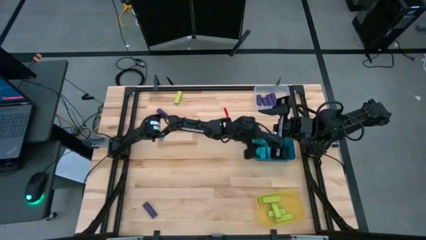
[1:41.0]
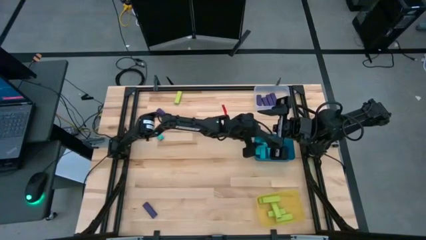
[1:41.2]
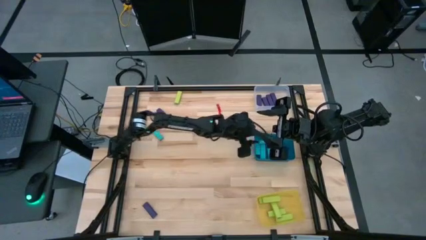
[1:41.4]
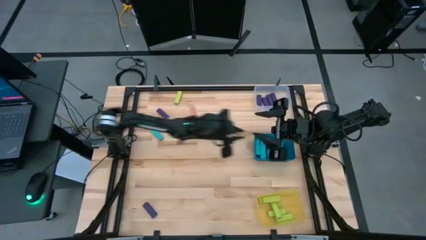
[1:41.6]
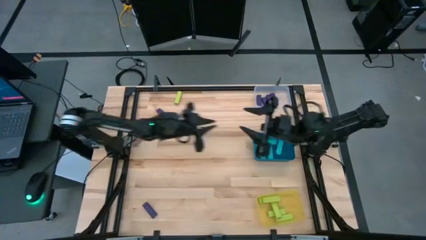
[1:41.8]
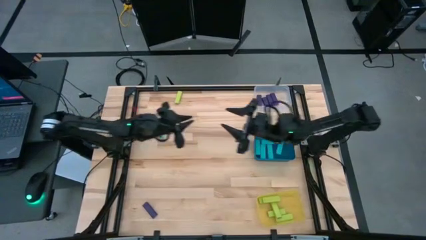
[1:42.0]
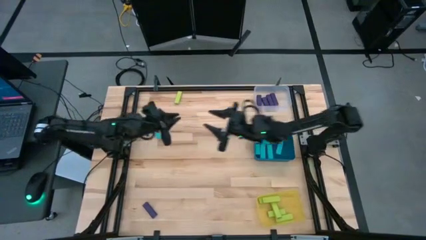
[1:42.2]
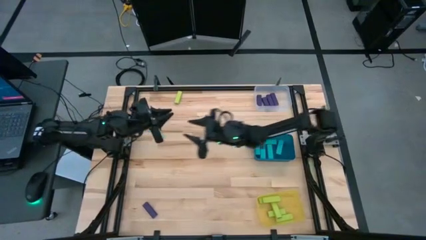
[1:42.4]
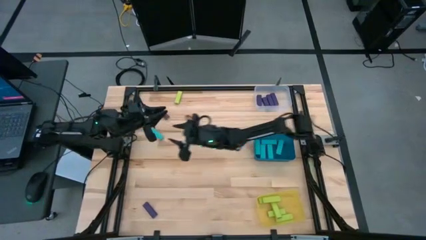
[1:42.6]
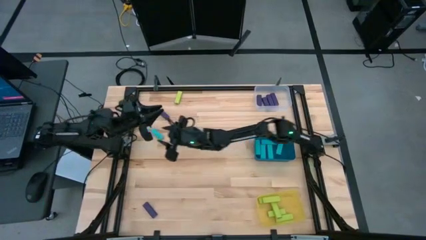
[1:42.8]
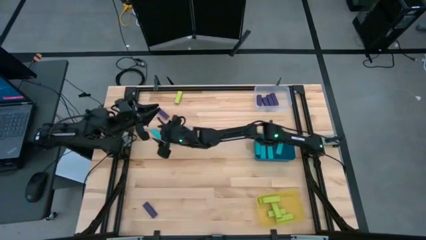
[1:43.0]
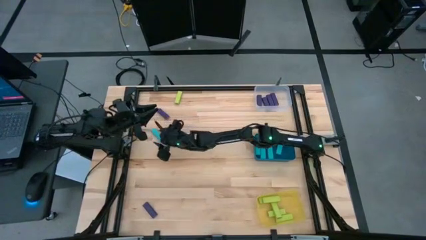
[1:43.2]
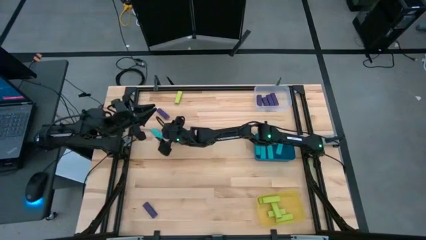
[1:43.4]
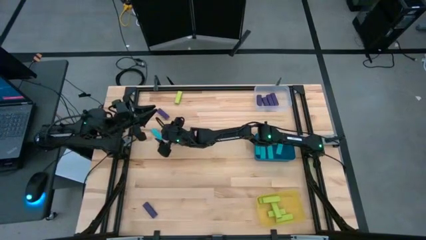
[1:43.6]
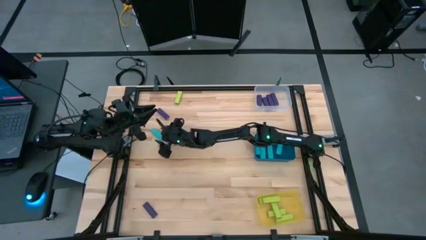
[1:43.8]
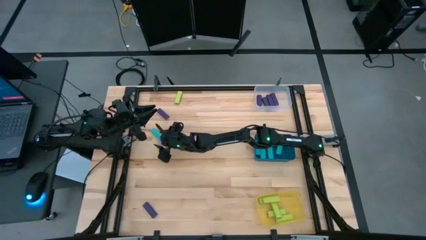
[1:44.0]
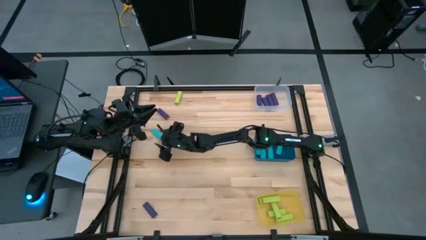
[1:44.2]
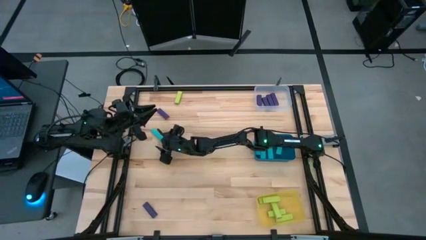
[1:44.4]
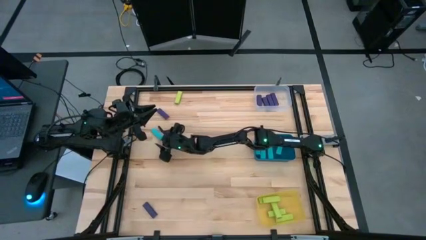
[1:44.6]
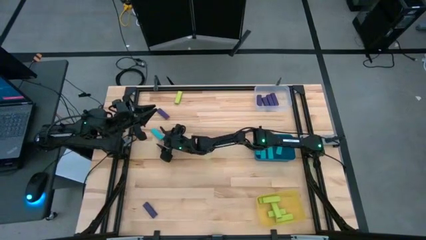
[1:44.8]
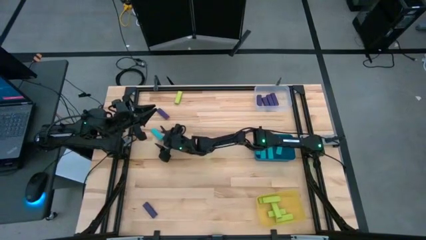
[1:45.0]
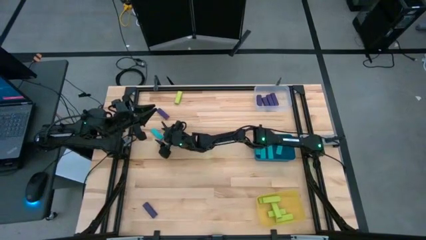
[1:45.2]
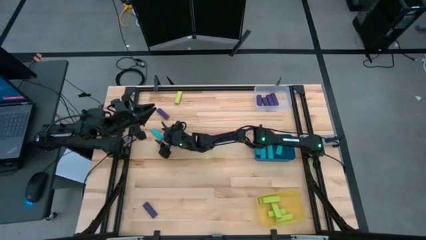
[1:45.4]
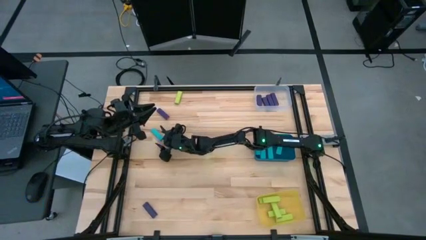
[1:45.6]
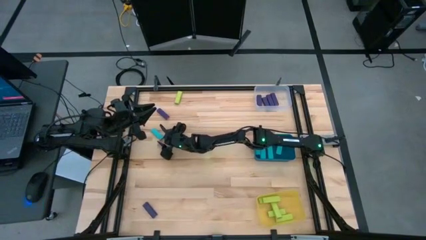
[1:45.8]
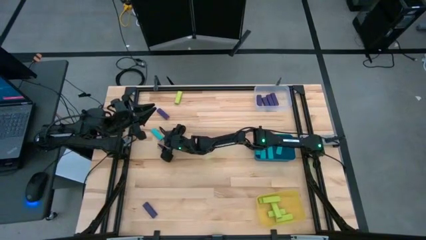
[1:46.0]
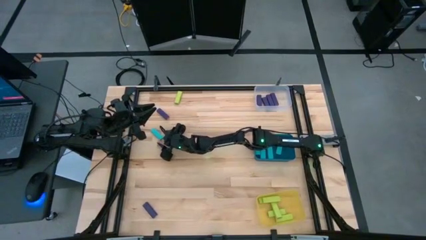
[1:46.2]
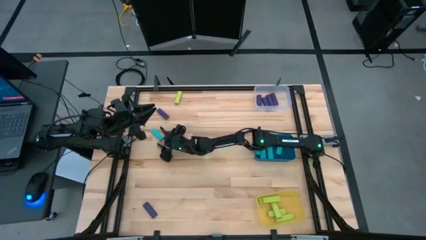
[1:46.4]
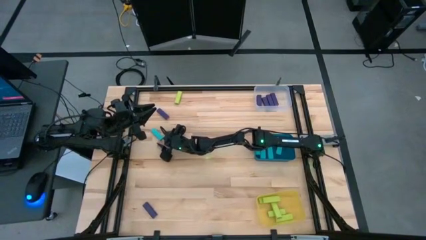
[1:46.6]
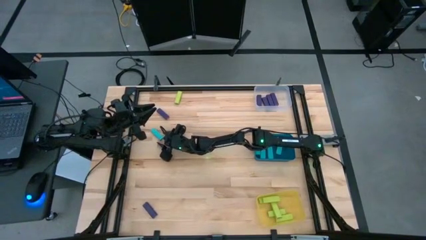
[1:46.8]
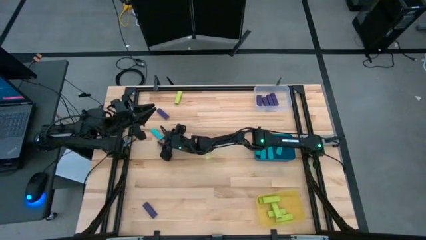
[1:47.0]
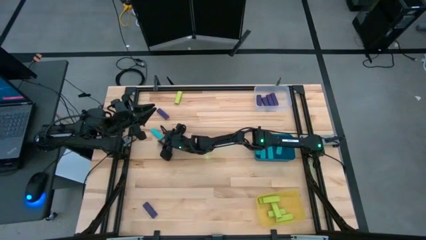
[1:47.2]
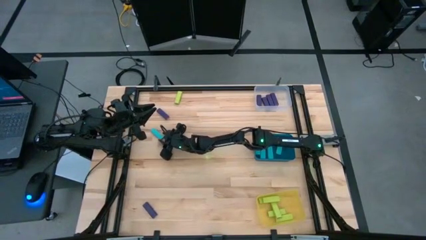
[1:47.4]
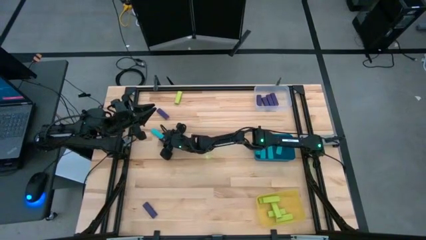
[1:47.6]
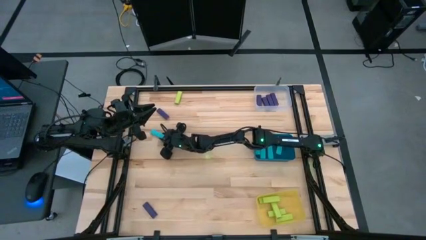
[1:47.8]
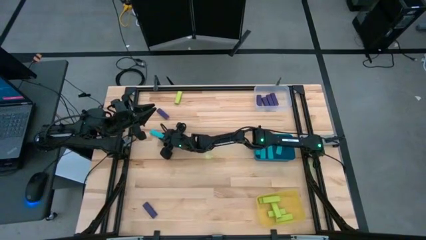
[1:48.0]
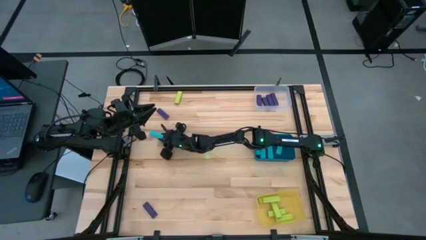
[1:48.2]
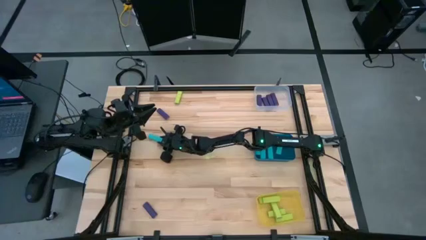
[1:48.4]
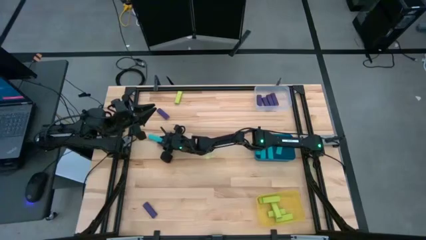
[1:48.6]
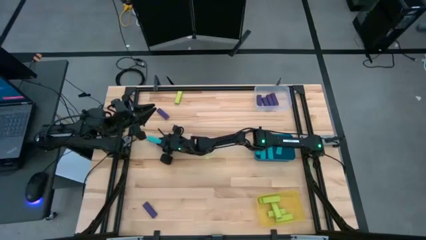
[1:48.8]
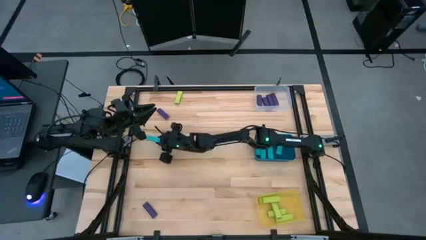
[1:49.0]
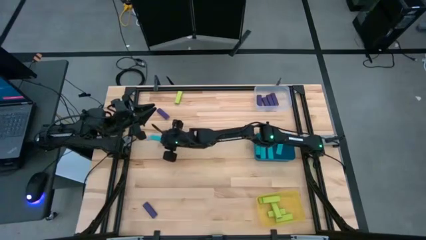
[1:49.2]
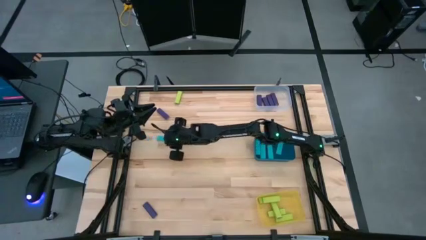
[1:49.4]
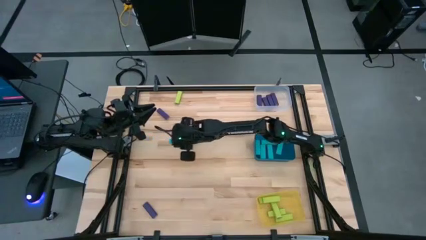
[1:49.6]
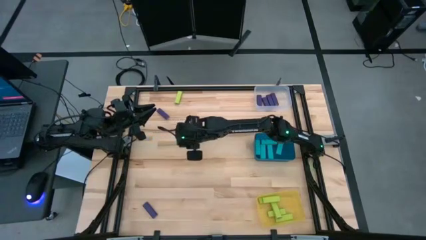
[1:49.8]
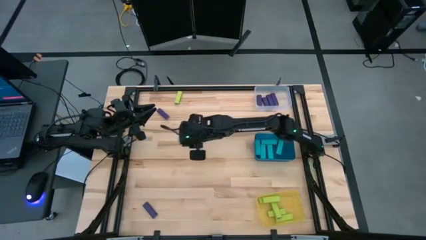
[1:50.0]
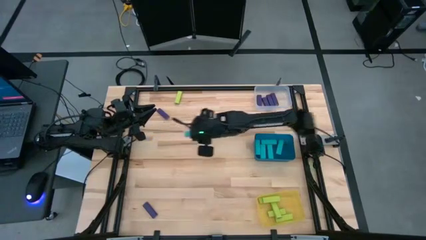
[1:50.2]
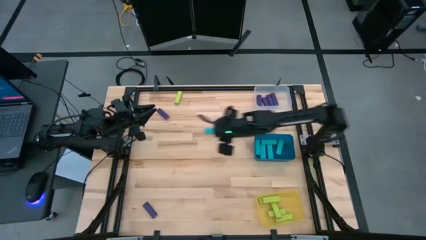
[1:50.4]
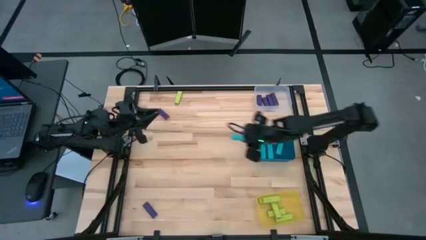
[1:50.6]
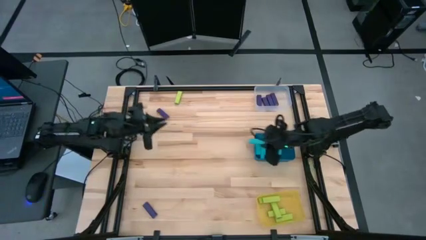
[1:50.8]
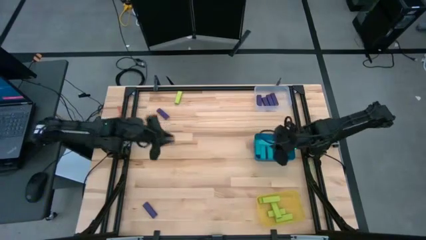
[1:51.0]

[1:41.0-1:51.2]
Task: Sort blocks
Put the light blue block into the blue bin

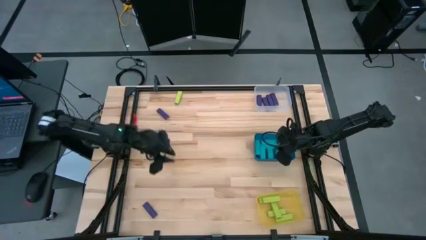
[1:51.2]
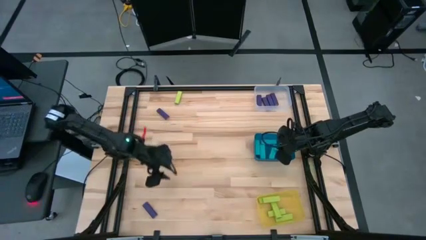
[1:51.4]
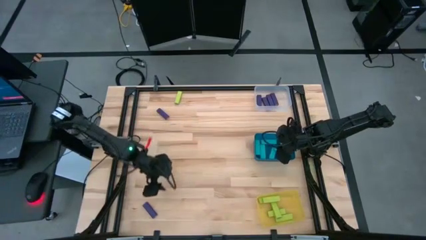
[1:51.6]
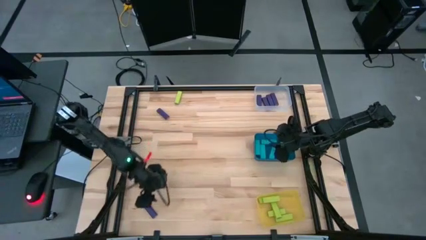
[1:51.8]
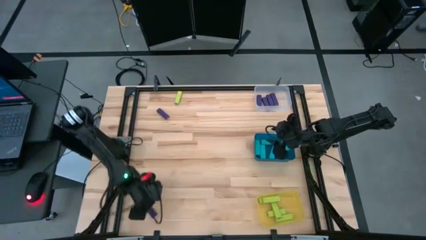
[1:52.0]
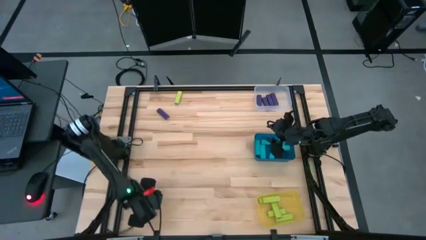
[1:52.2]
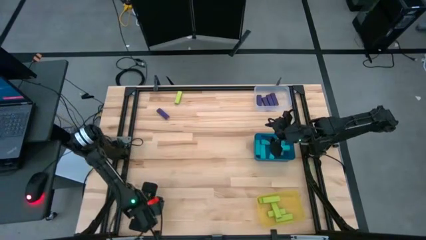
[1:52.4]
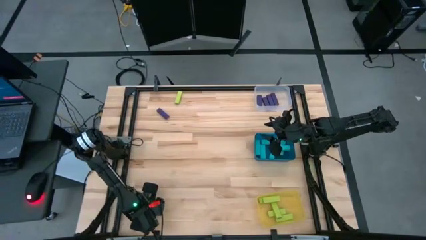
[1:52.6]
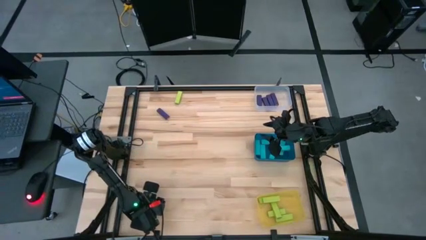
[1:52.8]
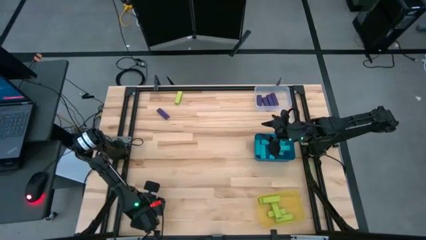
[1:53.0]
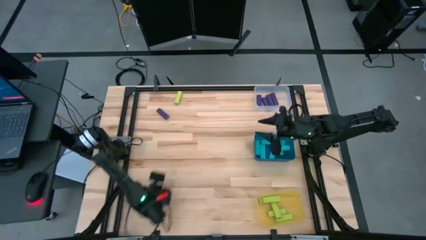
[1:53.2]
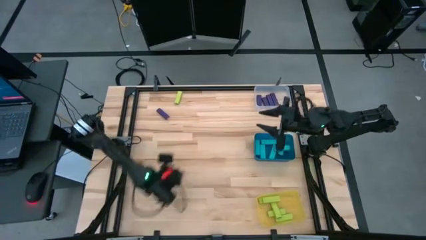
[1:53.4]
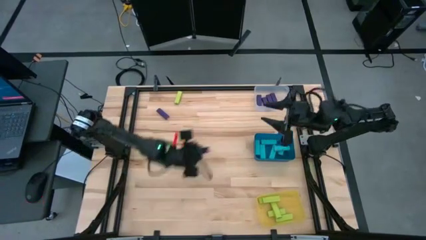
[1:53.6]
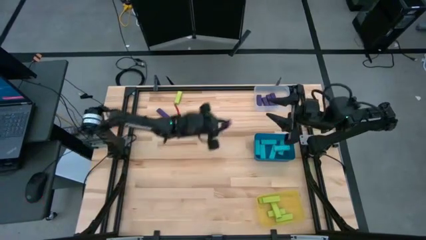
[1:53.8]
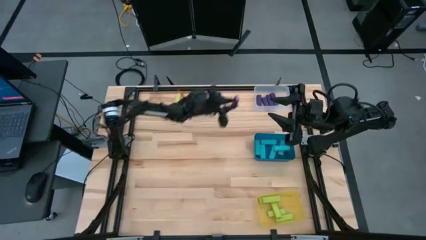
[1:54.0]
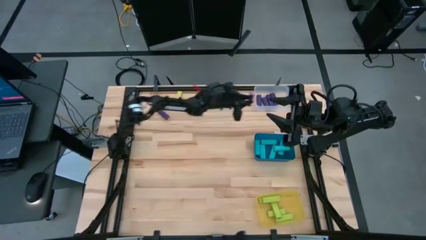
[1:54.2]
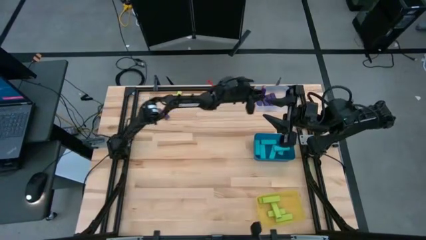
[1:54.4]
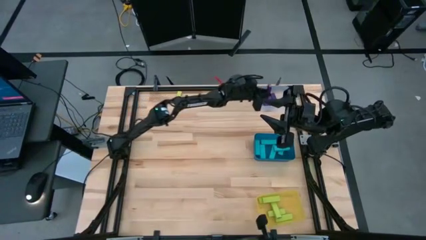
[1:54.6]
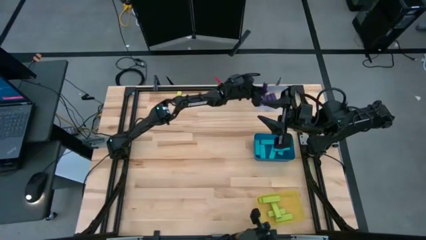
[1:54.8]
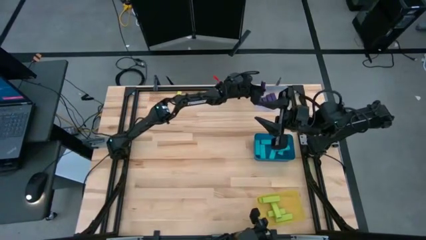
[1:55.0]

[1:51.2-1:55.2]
Put the purple block into the transparent bin
